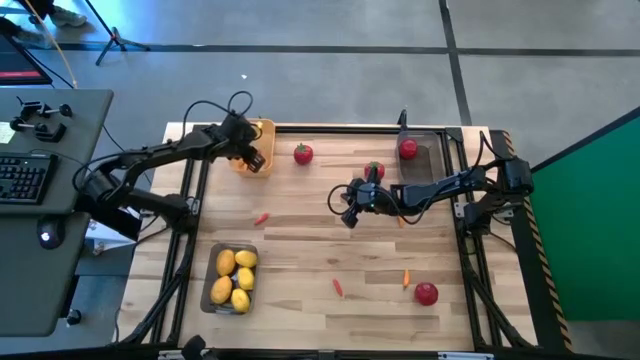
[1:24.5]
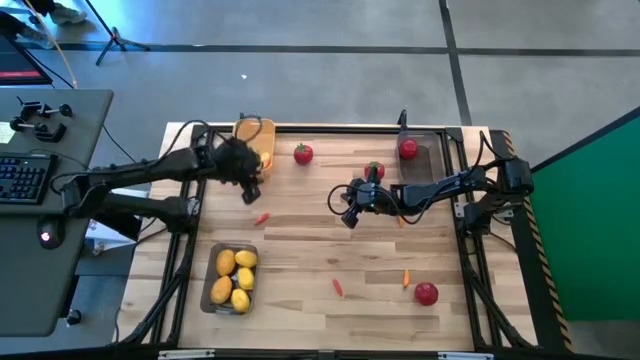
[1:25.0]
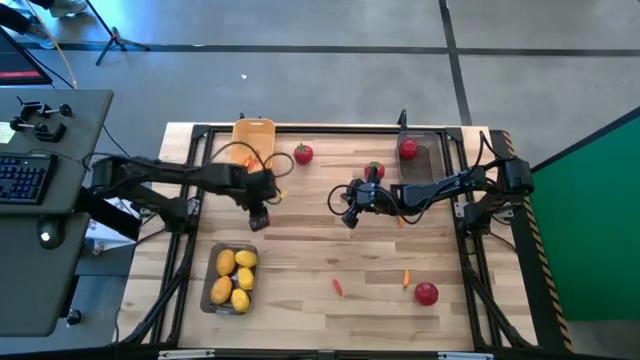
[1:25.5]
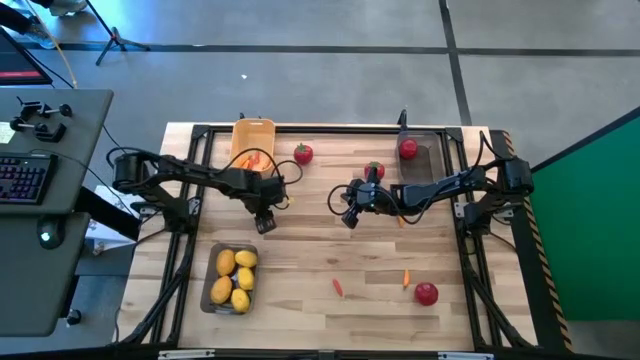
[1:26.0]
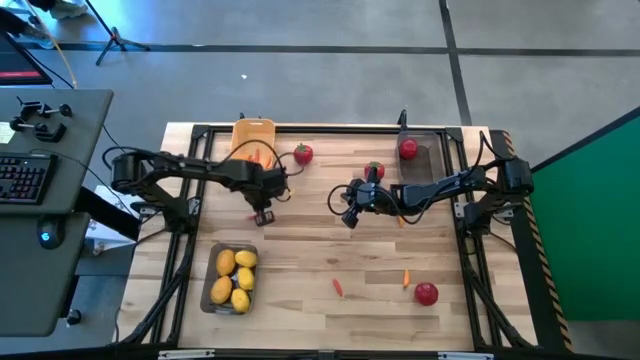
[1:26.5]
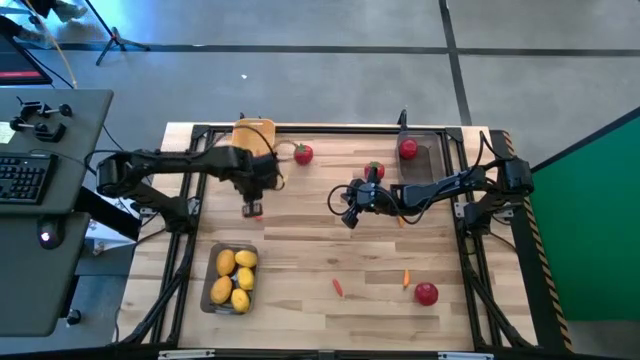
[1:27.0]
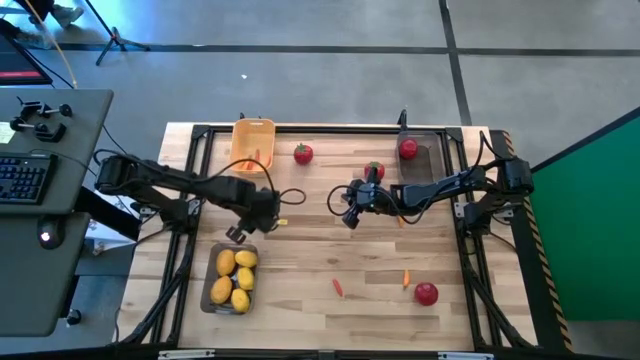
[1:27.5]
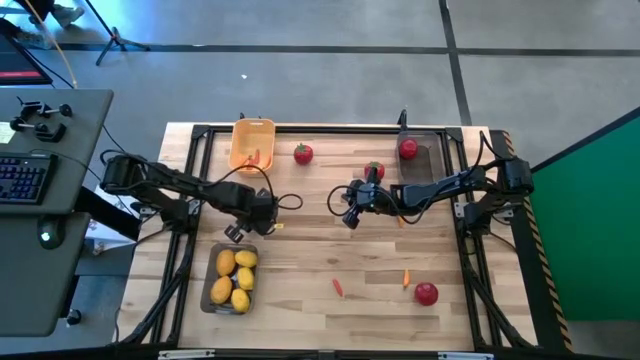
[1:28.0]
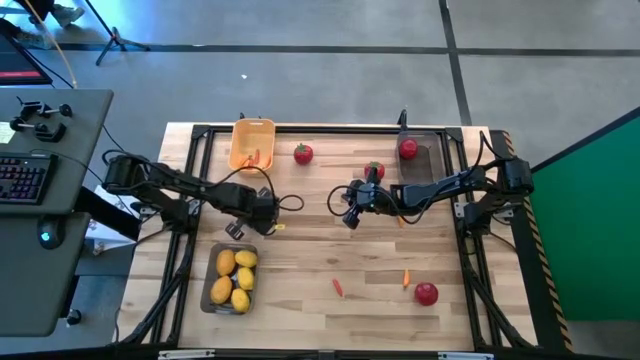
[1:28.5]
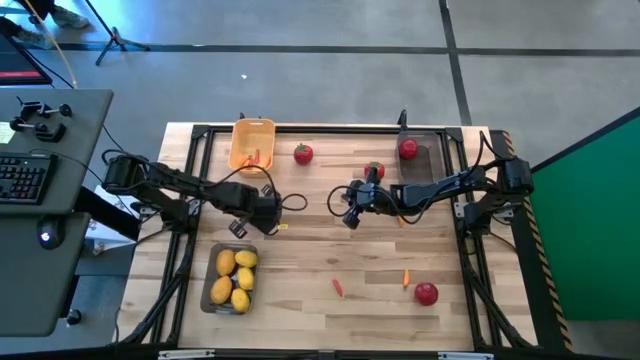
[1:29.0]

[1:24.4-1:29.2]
Task: Sort produce into baskets
Put the chili pepper into the orange bin

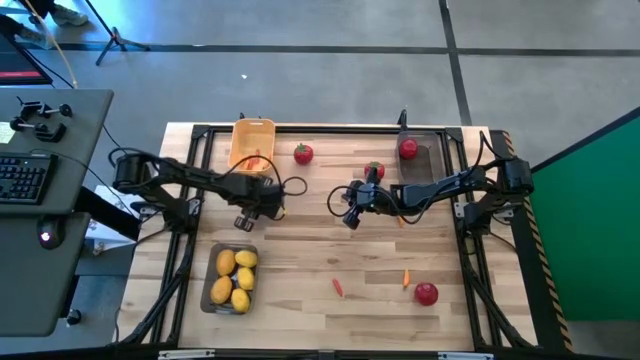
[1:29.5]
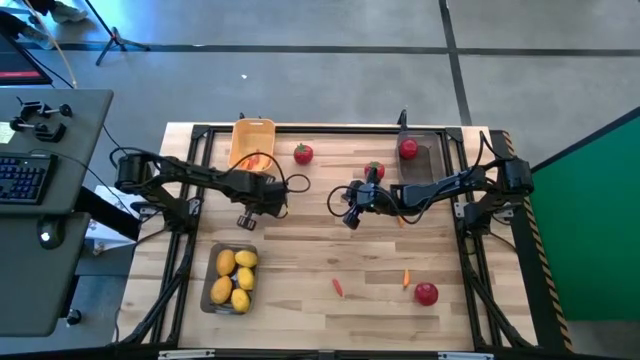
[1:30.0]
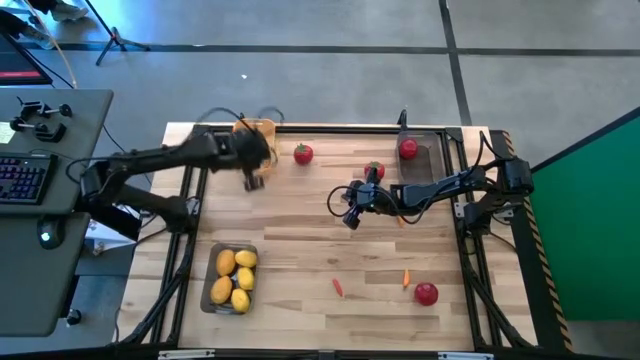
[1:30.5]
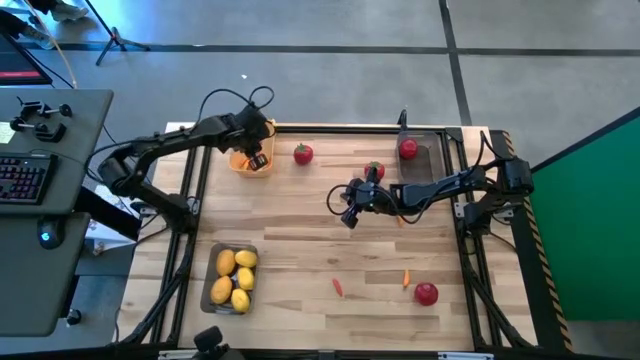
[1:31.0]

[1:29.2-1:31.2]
Put the chili pepper into the orange bin

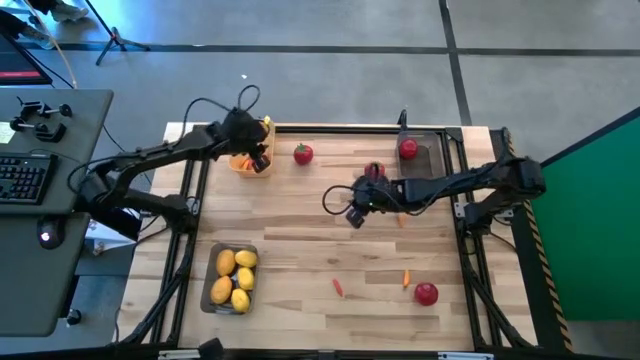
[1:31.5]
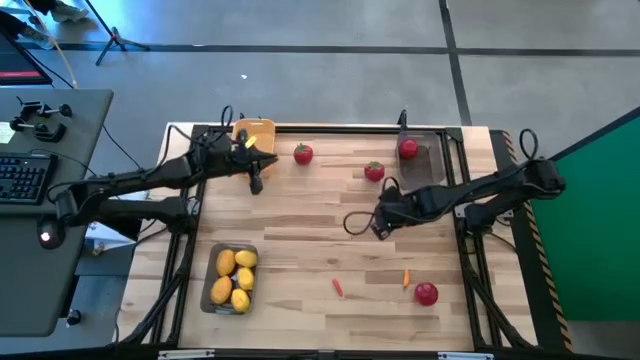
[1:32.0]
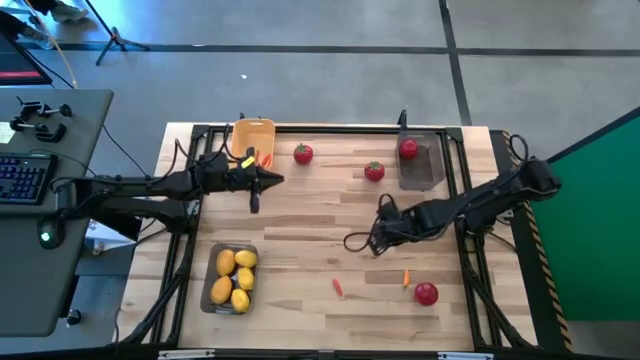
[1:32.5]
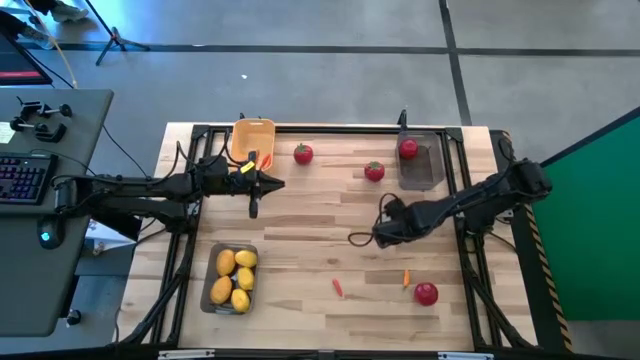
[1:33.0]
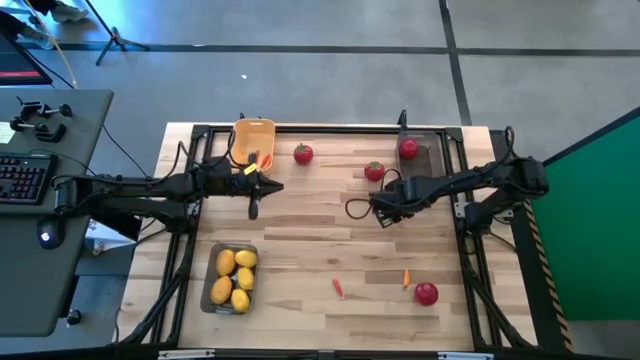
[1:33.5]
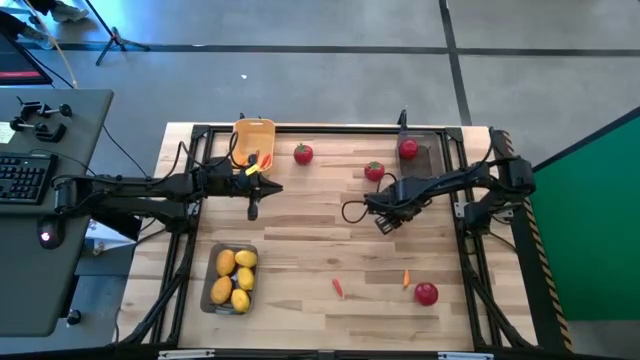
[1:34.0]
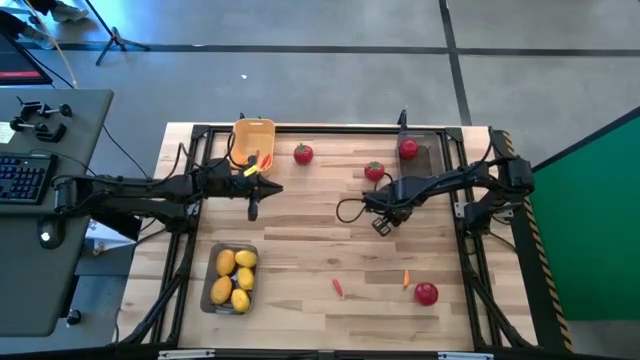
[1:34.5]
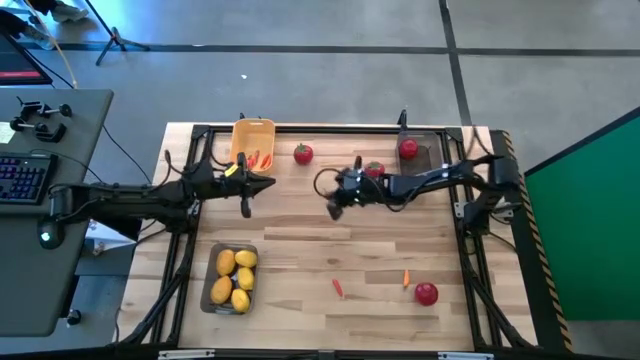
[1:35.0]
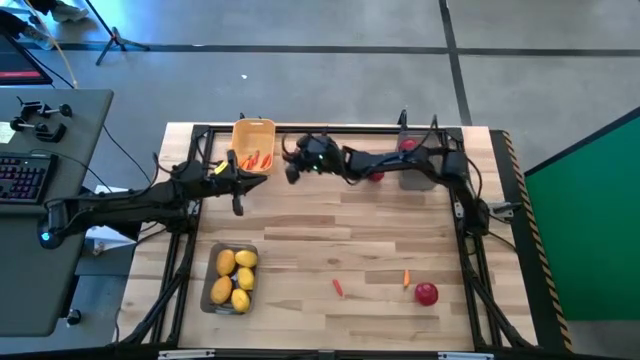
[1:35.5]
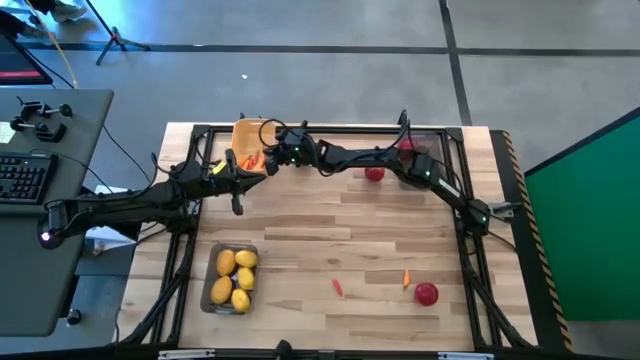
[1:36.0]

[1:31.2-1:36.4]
Put the chili pepper into the orange bin

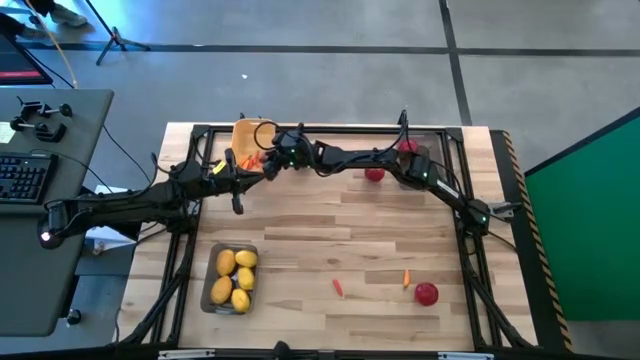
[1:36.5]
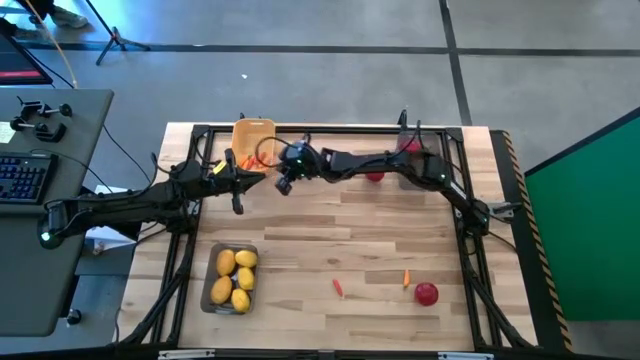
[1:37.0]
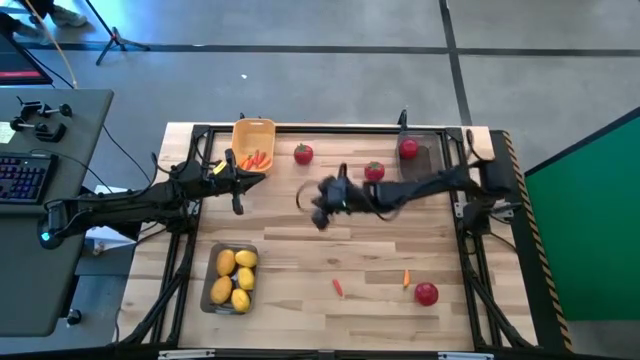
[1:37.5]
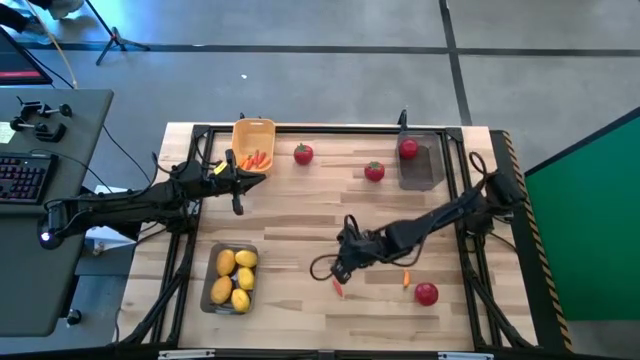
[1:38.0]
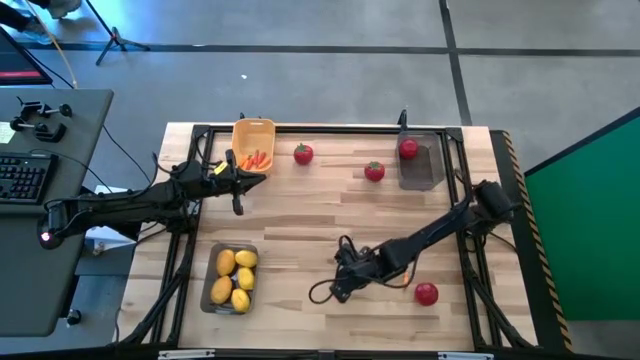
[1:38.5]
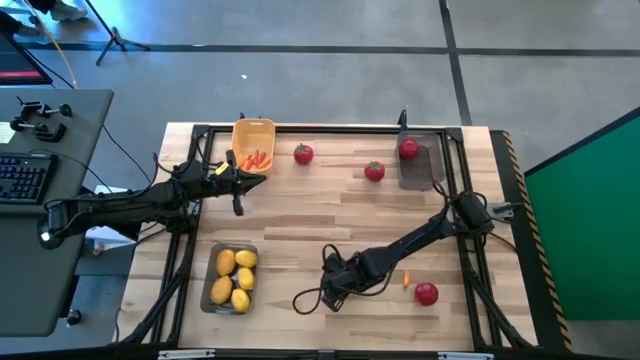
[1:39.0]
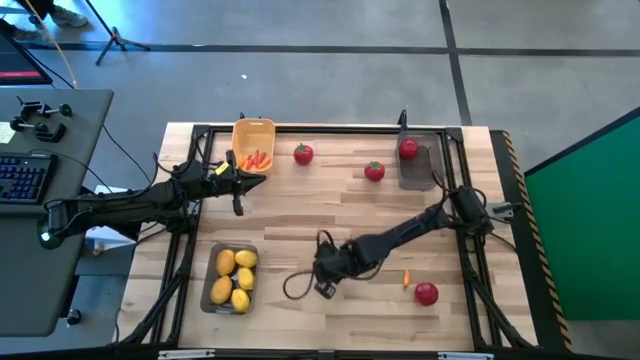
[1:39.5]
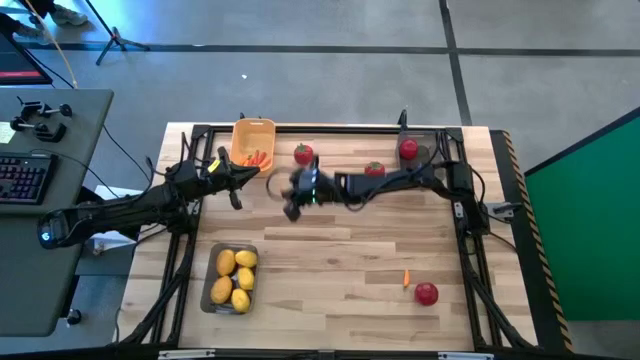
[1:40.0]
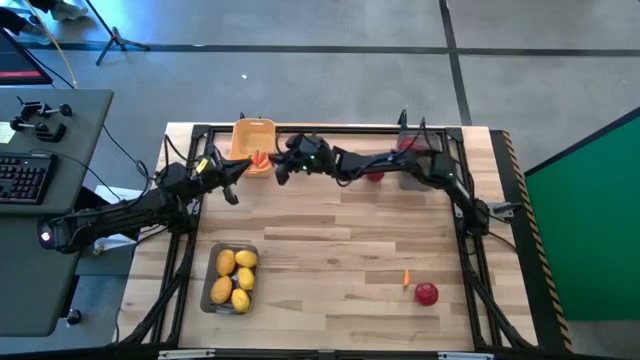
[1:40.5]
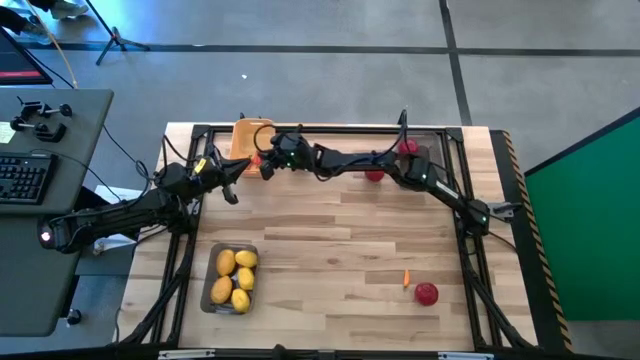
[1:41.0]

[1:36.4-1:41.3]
Put the chili pepper into the orange bin

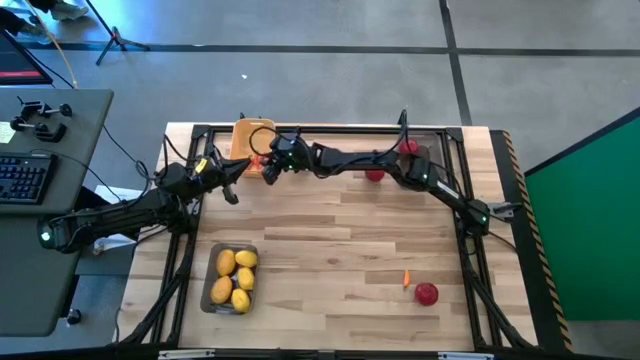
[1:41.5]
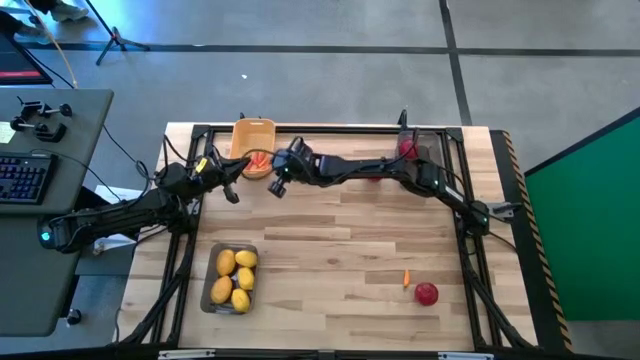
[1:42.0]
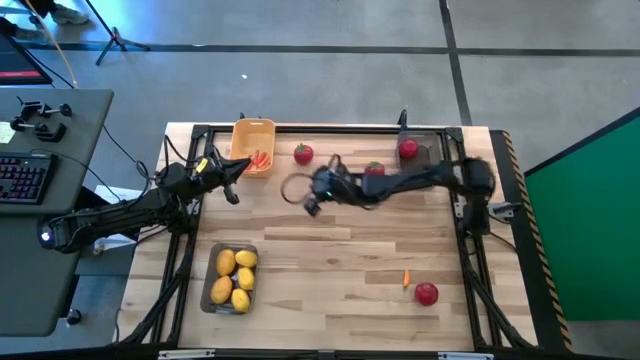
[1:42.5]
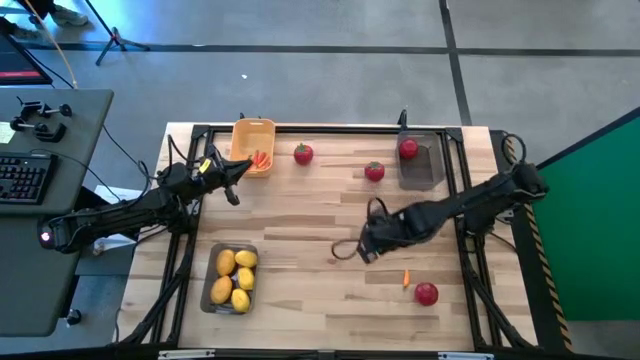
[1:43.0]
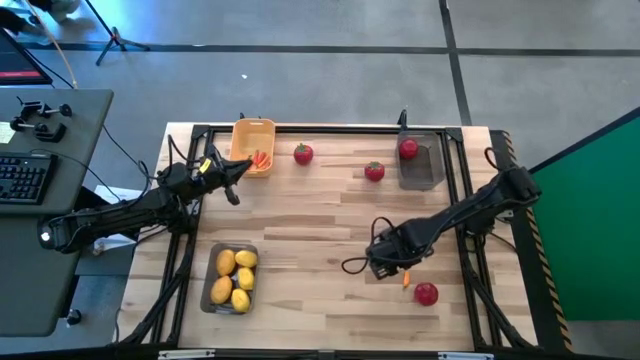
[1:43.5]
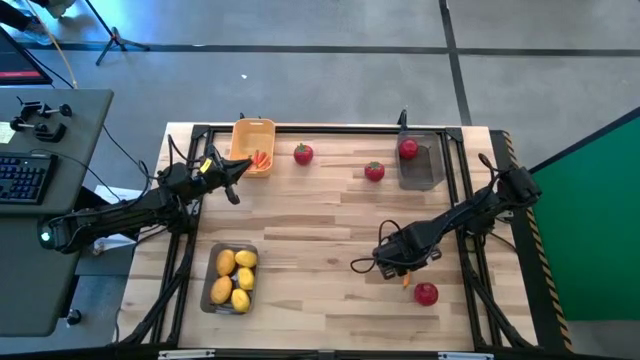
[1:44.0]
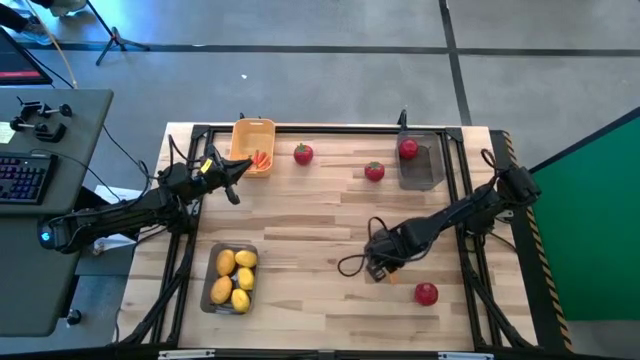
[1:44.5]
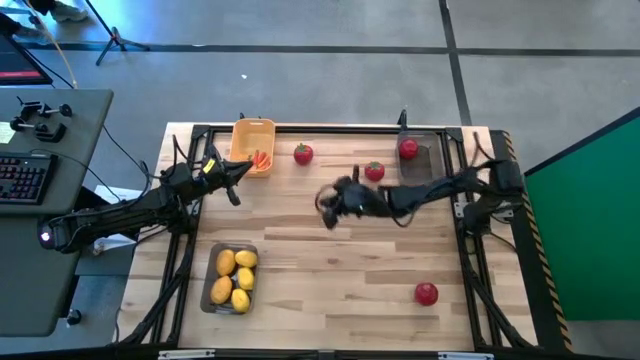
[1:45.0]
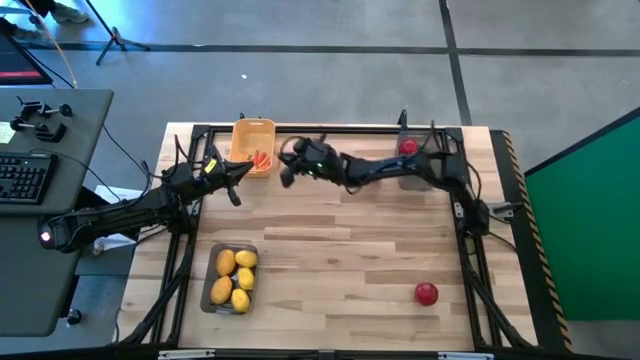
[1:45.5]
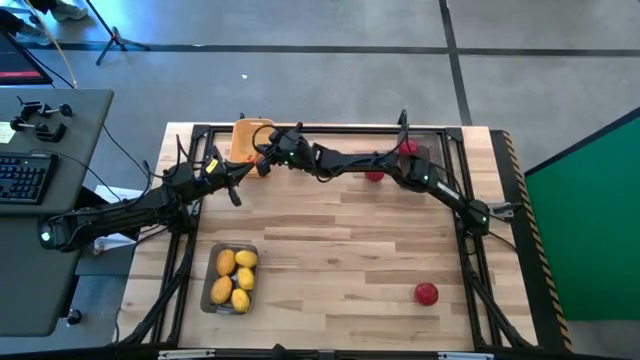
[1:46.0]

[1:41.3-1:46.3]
Put the chili pepper into the orange bin
